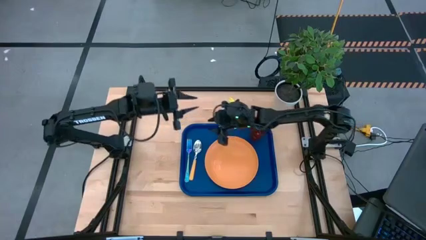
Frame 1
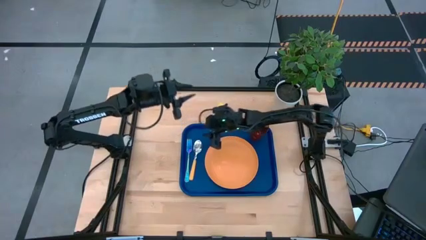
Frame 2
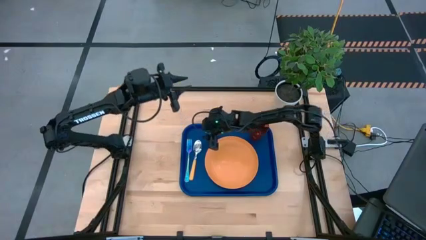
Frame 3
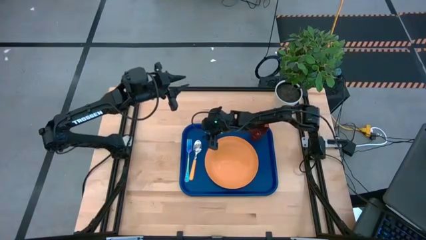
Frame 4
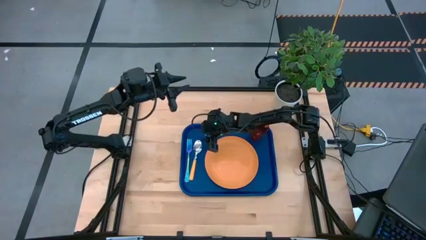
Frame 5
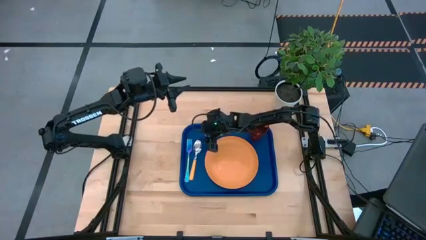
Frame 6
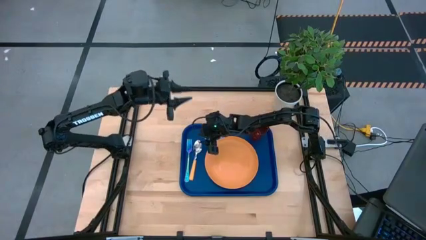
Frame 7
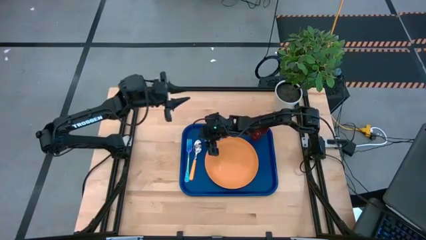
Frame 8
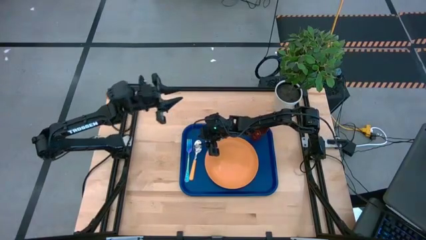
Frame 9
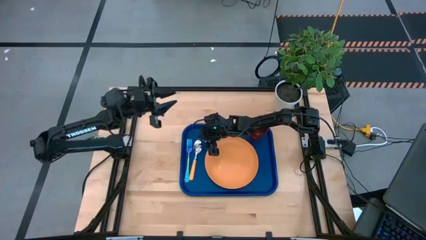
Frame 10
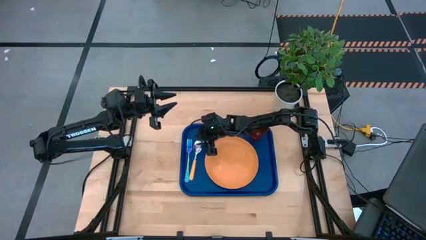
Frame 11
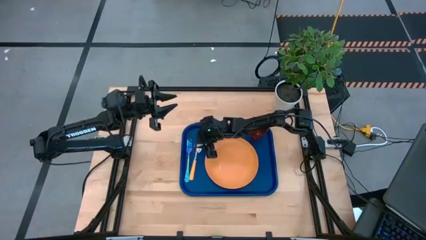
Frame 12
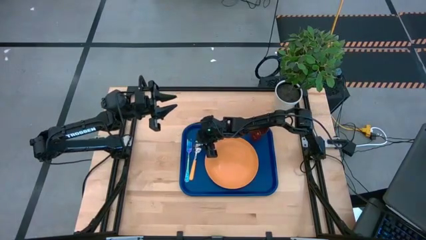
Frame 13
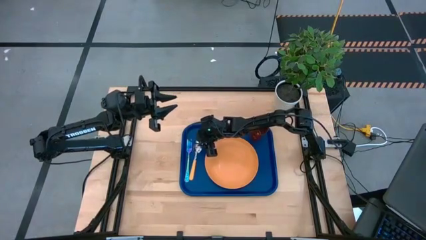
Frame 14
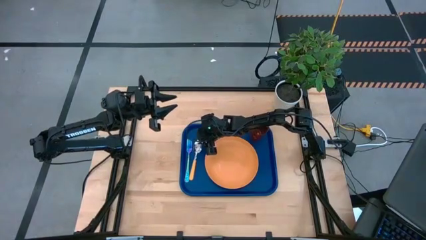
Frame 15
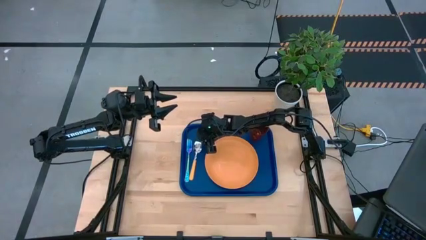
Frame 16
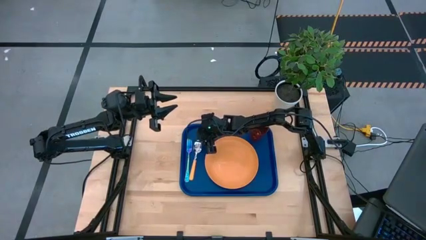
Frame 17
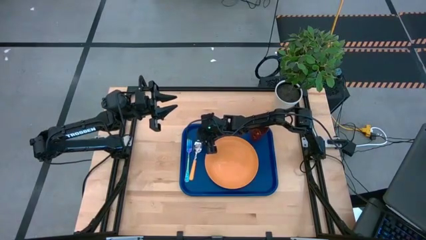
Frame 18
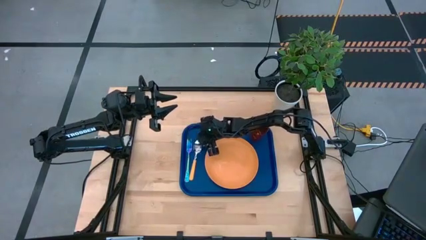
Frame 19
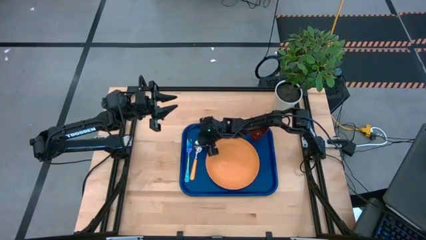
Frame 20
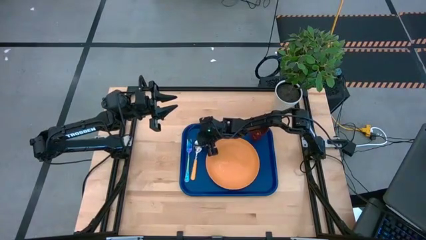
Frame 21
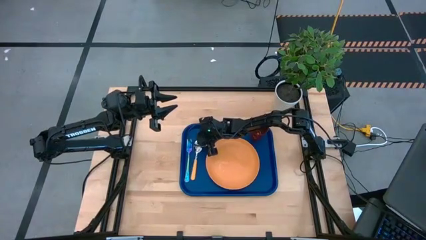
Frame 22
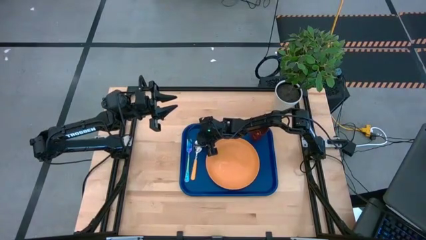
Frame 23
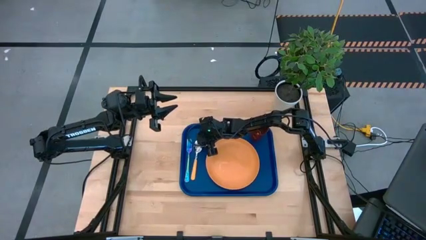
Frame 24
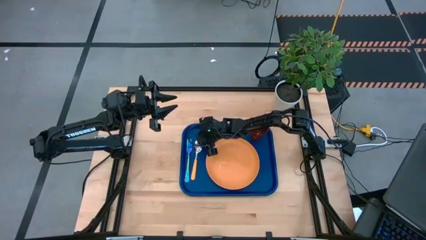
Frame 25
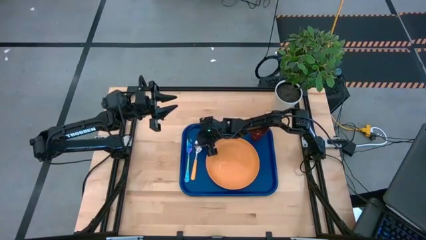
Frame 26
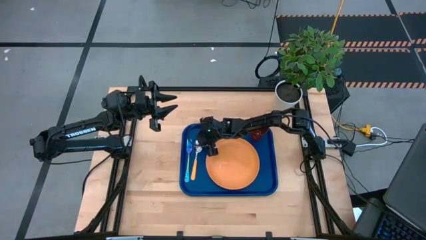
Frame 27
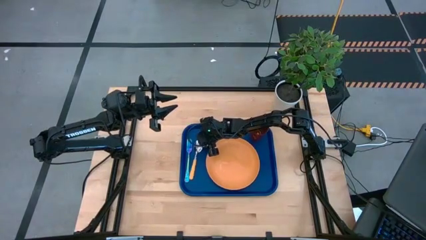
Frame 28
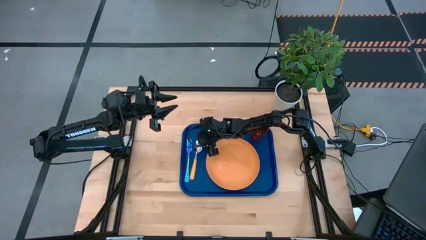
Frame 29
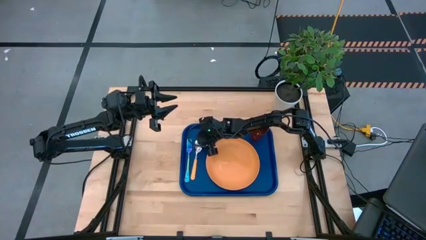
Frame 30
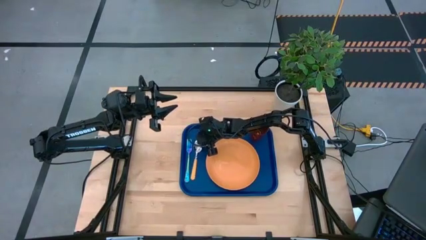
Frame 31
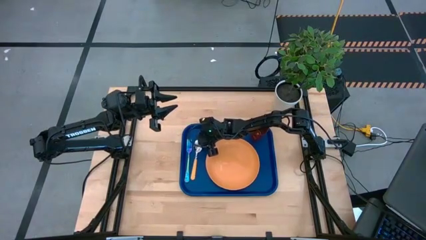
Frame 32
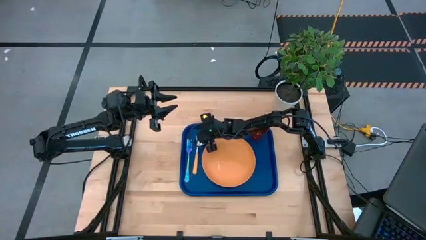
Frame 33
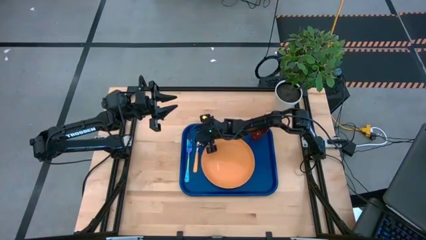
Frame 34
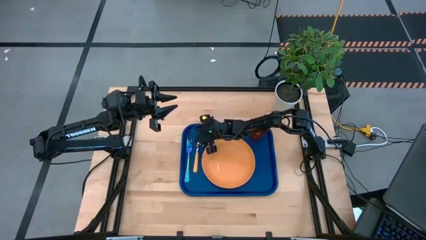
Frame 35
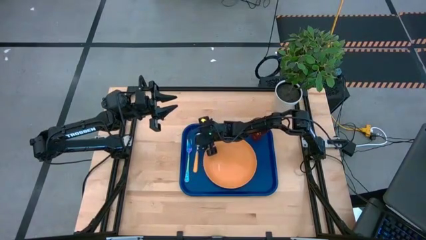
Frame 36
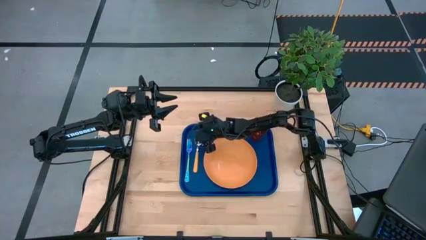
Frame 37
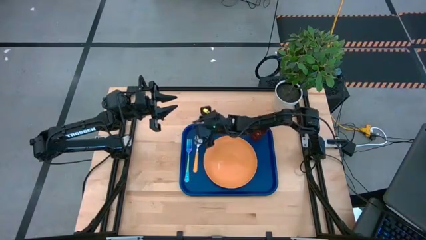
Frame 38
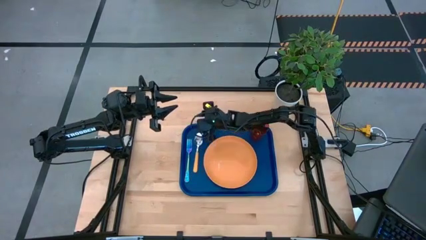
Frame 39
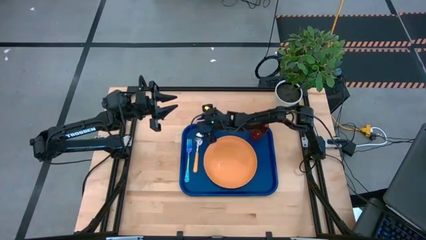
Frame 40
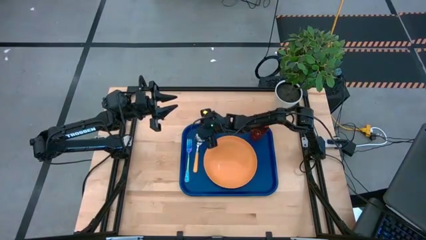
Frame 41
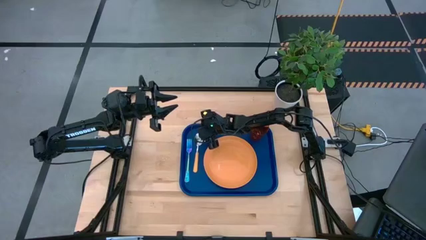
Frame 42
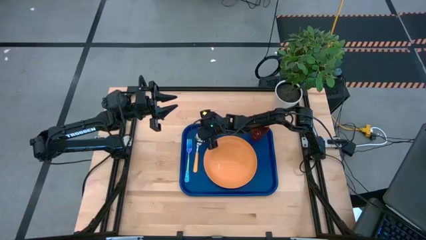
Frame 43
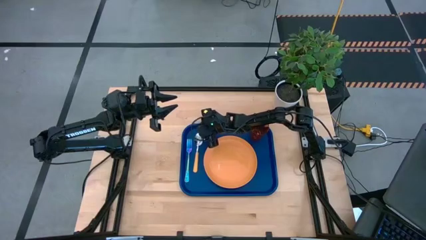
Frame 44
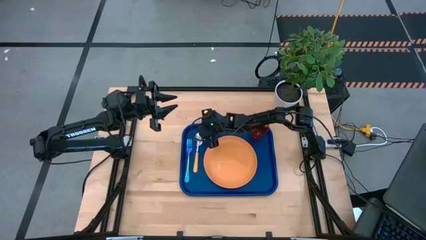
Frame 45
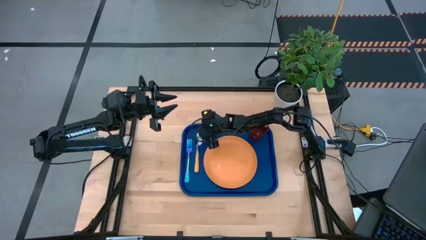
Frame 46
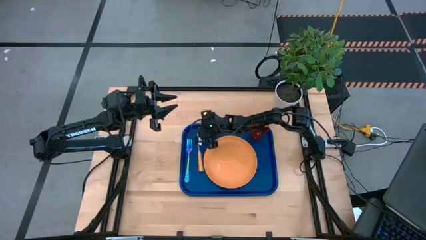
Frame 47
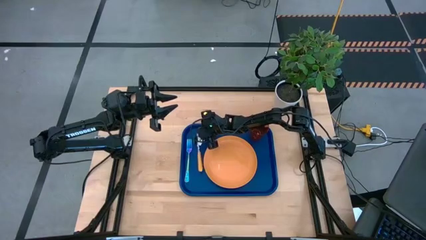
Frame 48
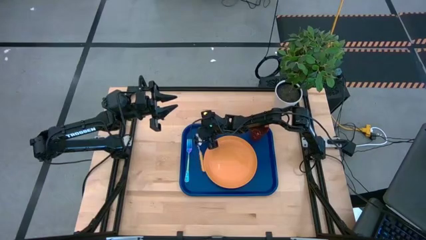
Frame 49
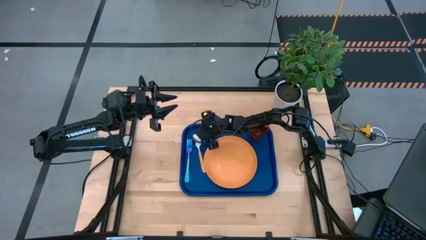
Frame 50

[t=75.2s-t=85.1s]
Task: Pick and place plate/cup/fork/spoon on tray
Put the orange fork to the right of the blue fork on the blue tray

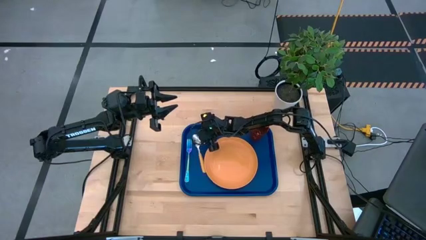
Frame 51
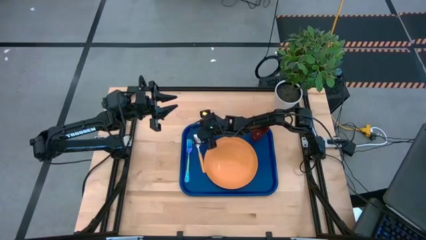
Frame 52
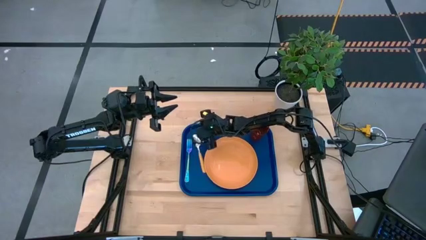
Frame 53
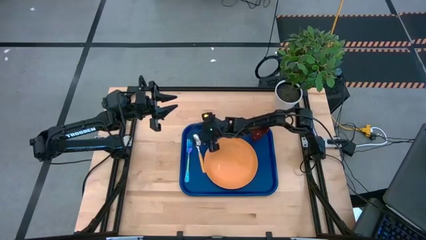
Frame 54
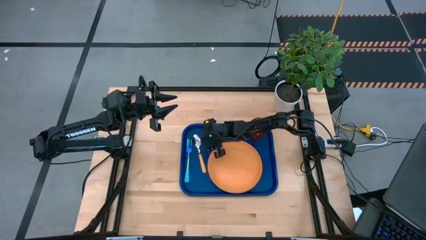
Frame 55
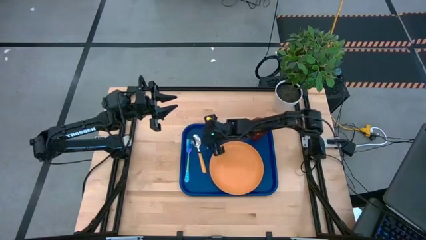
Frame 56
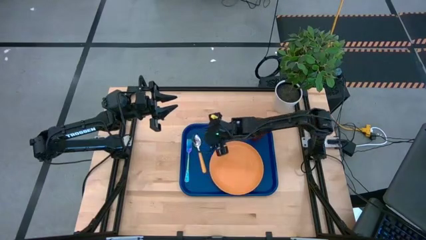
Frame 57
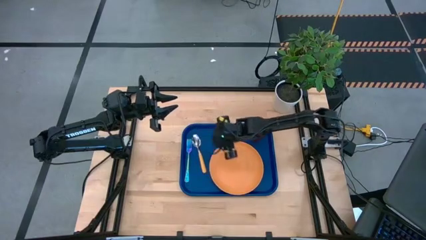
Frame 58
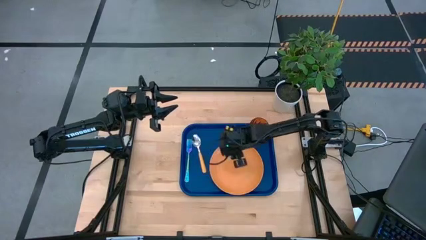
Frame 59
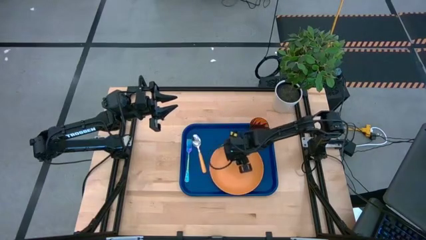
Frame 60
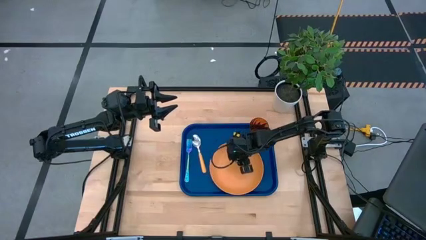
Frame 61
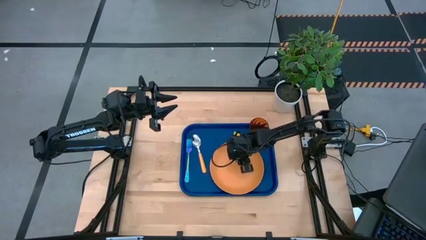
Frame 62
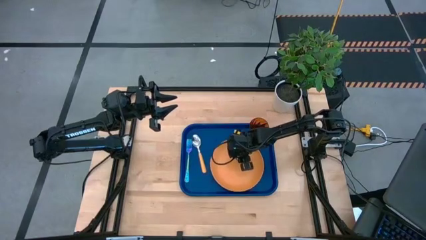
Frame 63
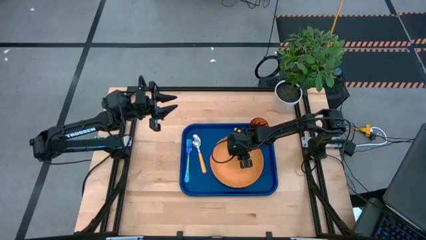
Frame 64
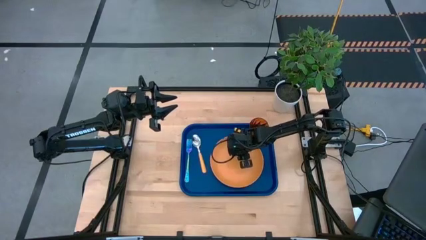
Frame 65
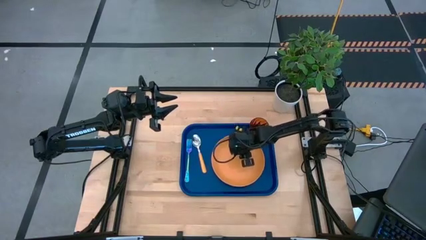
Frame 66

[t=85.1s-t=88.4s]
Adjust the orange plate on the blue tray

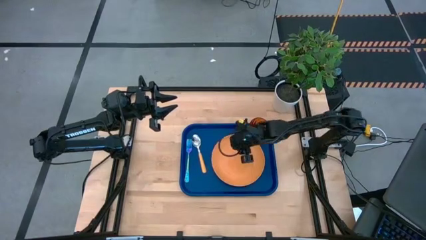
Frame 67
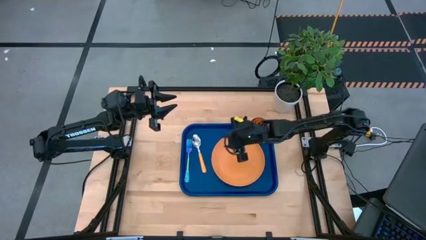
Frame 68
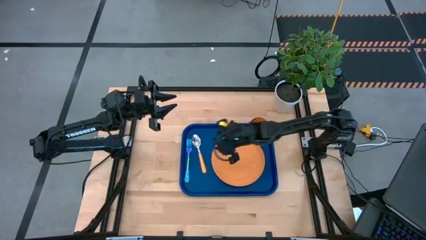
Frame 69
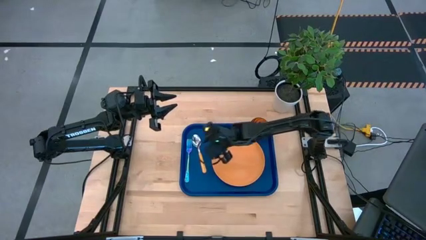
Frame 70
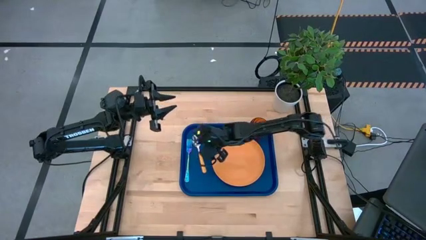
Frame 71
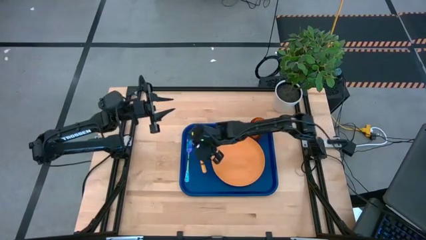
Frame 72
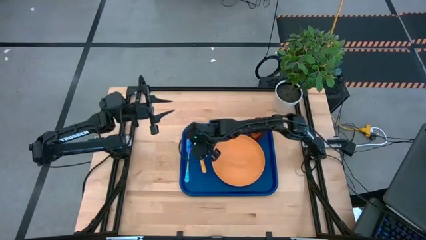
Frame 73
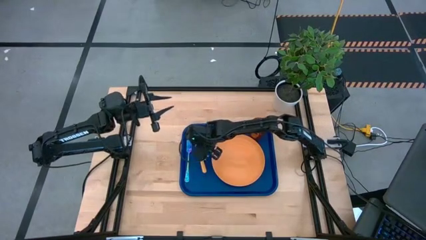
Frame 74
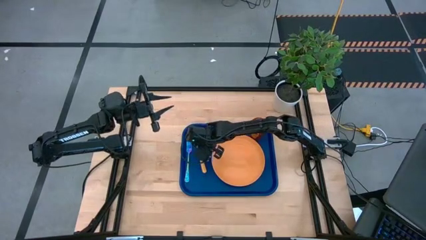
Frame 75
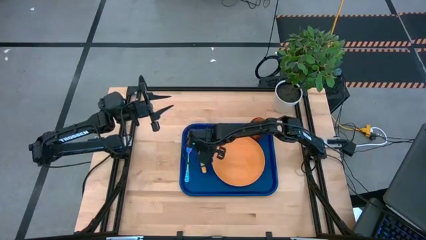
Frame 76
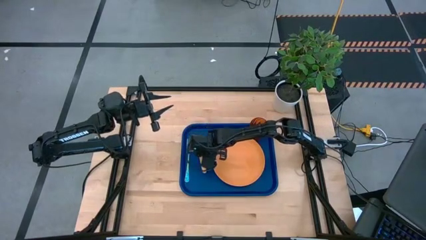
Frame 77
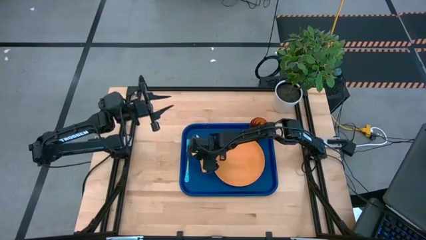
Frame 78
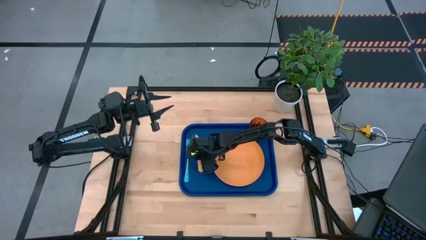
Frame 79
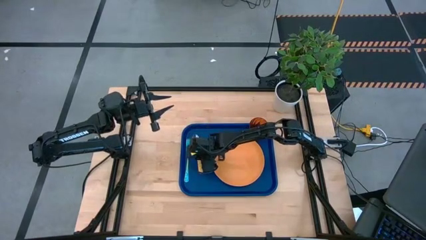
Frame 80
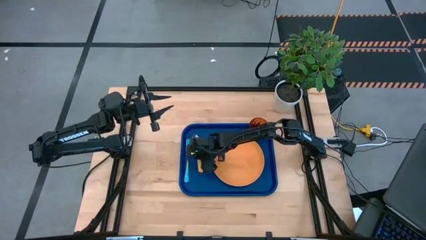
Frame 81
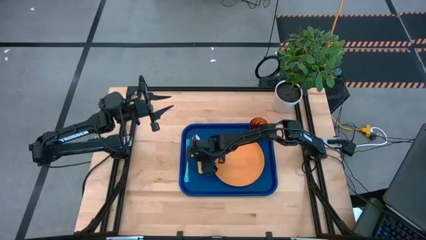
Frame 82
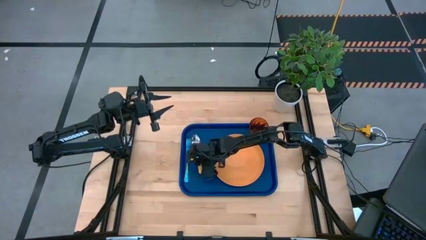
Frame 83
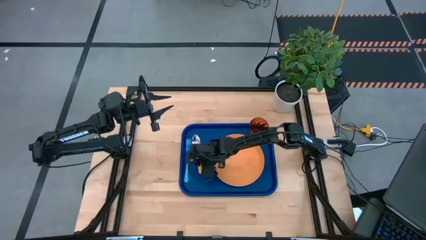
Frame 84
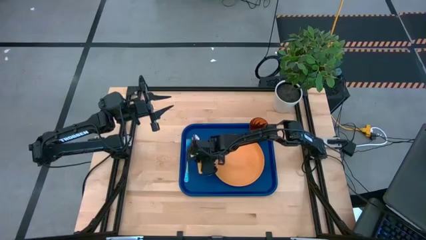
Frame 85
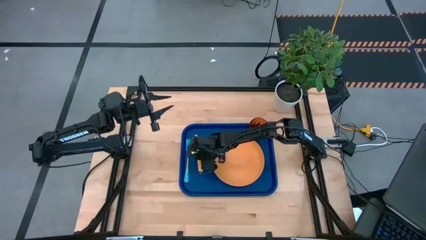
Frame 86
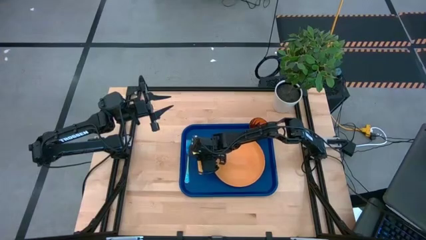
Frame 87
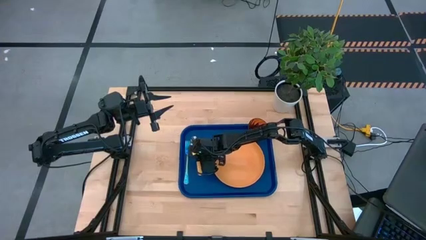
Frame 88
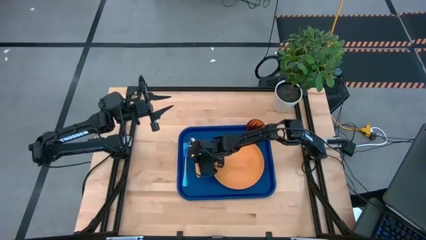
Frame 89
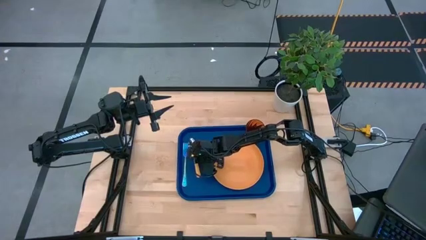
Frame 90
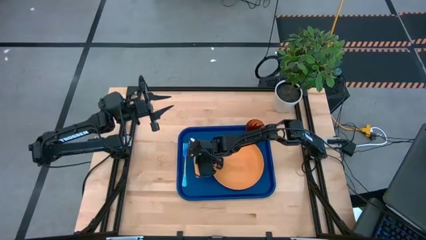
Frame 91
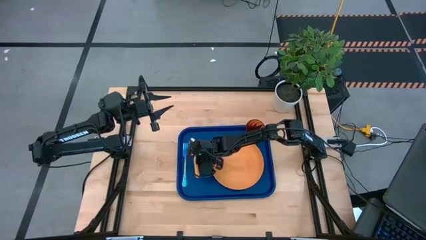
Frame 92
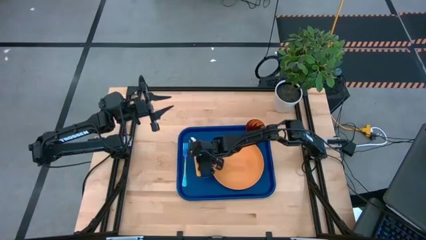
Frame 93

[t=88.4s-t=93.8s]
Adjust the orange spoon on the blue tray
